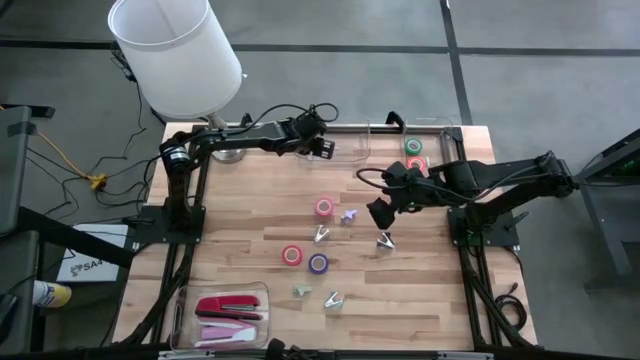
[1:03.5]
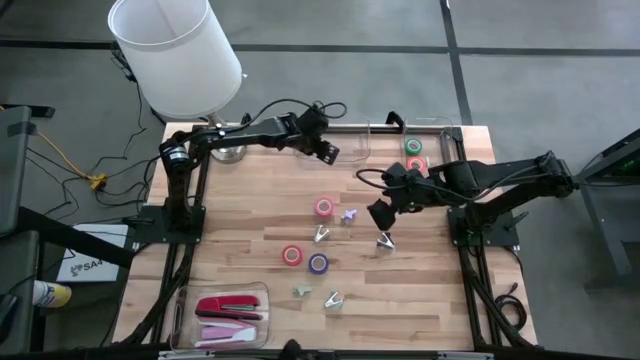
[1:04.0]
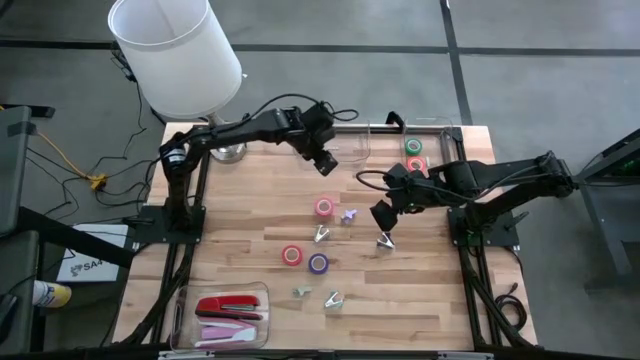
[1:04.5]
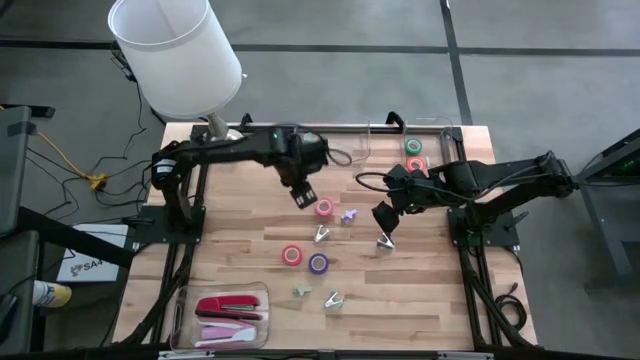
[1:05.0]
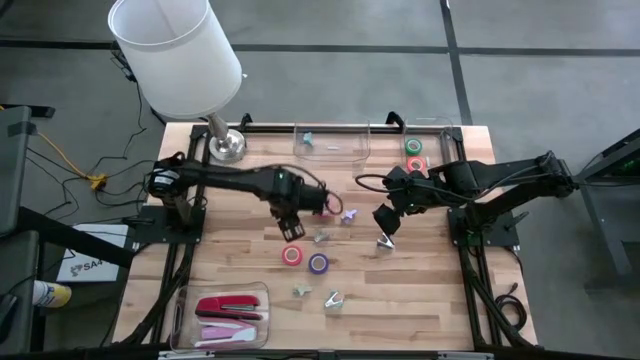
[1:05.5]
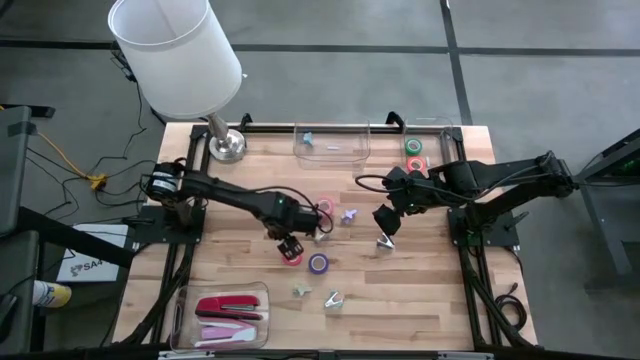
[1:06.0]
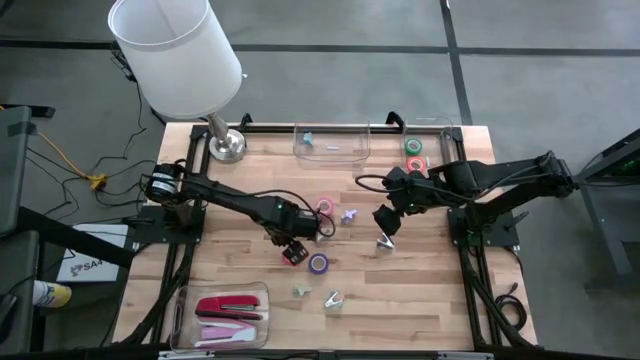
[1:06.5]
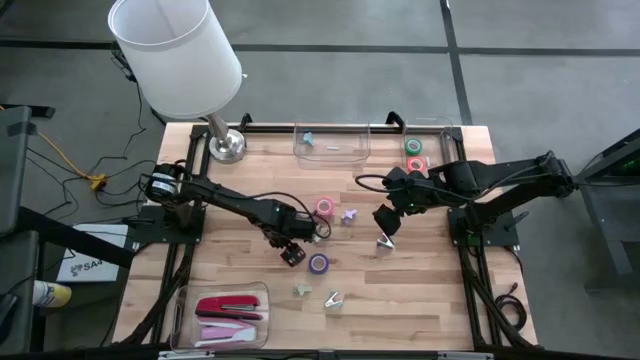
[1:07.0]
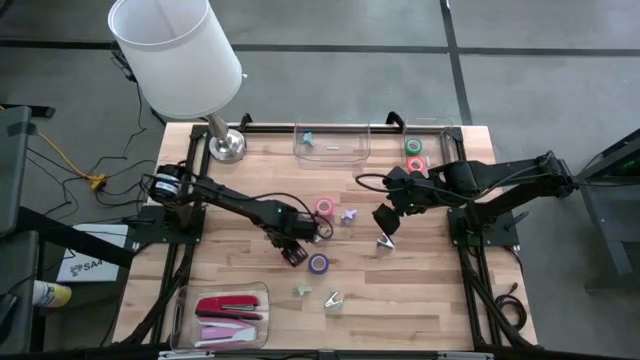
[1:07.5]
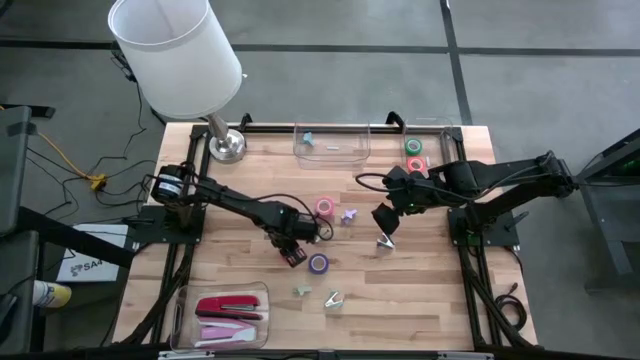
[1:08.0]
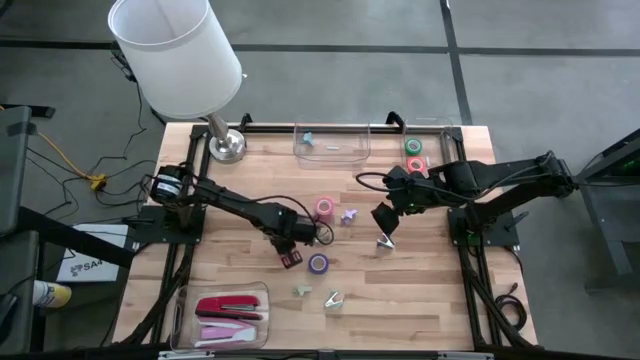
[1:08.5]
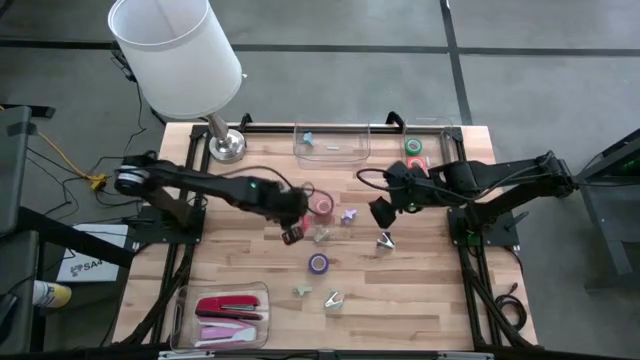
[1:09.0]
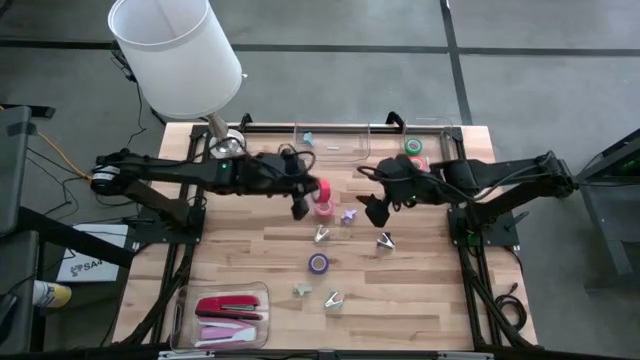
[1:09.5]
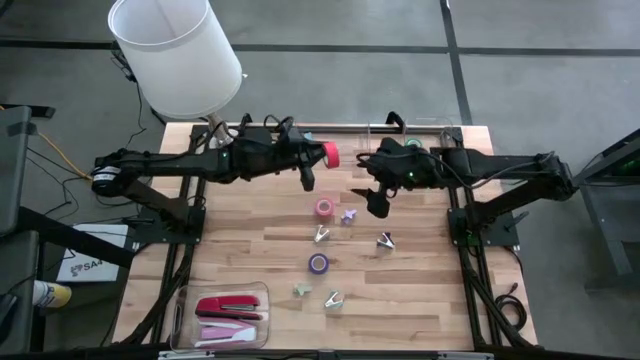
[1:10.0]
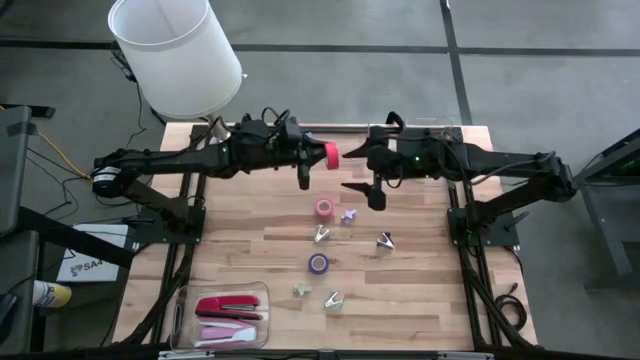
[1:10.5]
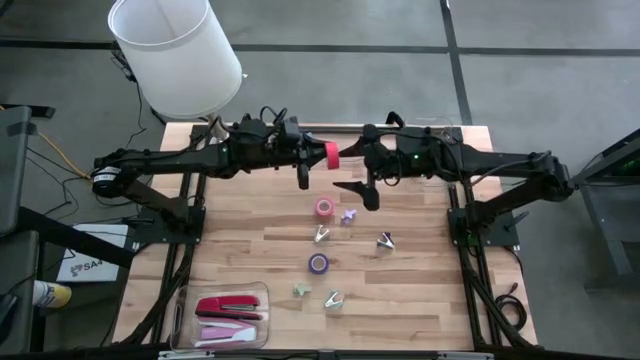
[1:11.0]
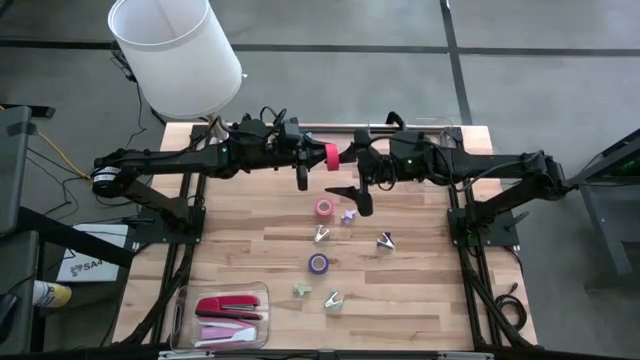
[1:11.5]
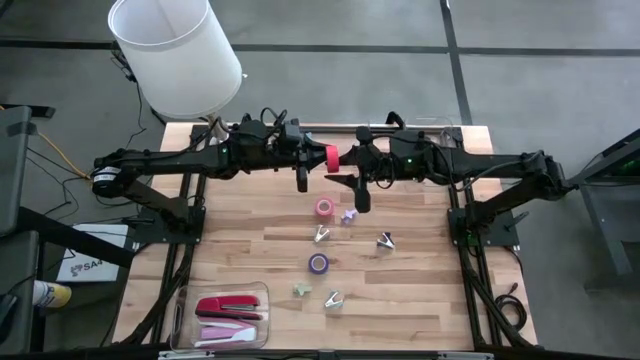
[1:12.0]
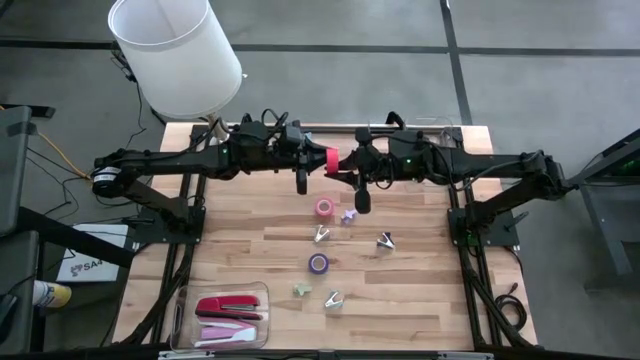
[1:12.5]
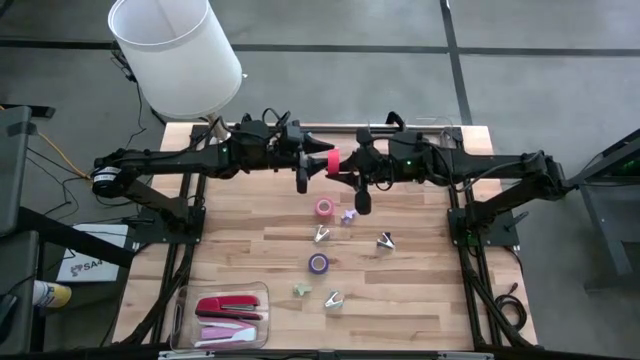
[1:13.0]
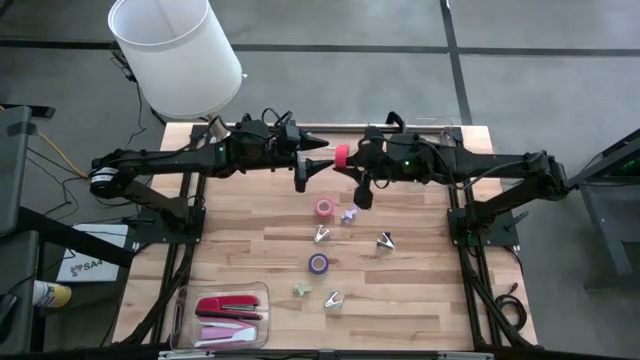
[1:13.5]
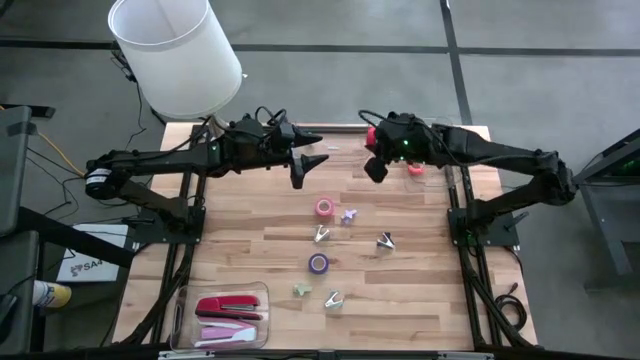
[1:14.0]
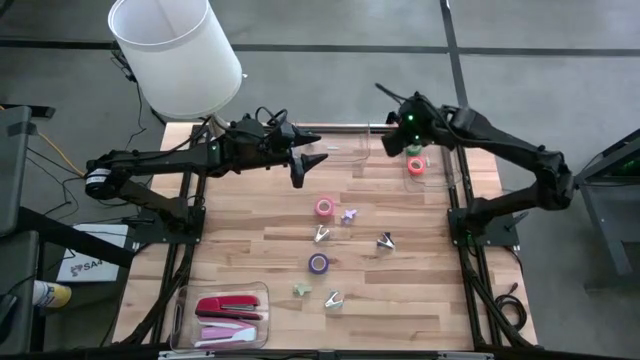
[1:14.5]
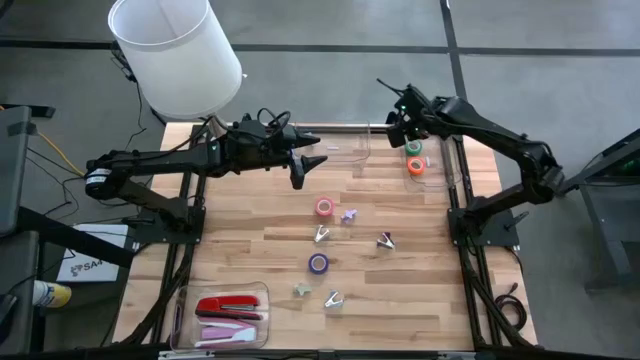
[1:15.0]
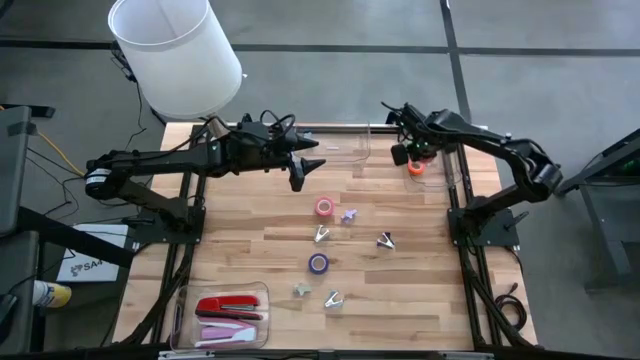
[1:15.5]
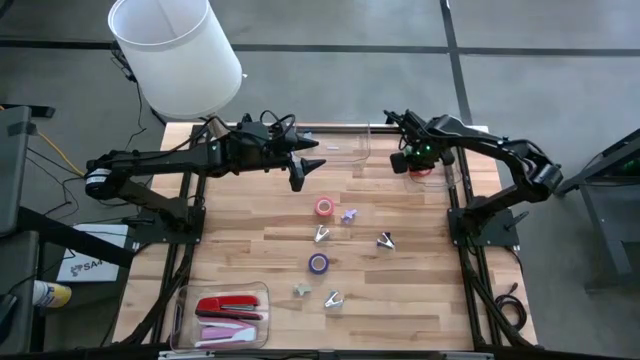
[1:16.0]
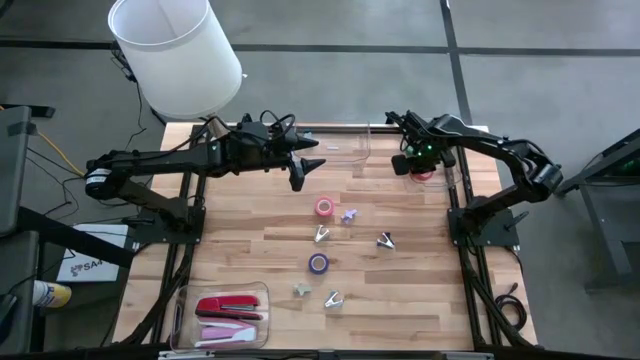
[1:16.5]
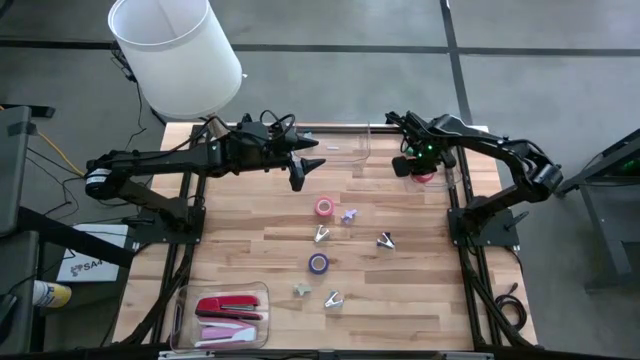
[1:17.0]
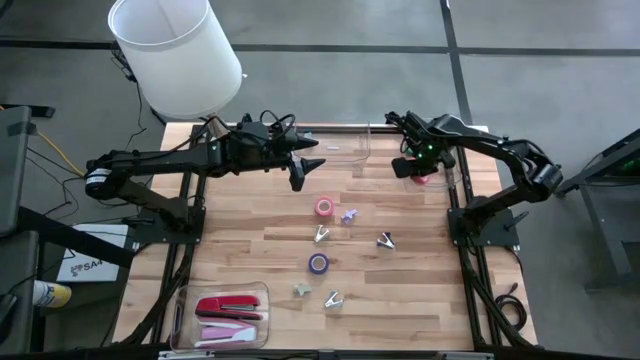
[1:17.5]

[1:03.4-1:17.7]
Task: Pick and place Stapler, Stapler remover, tape
Put the red tape into the top right transparent bin

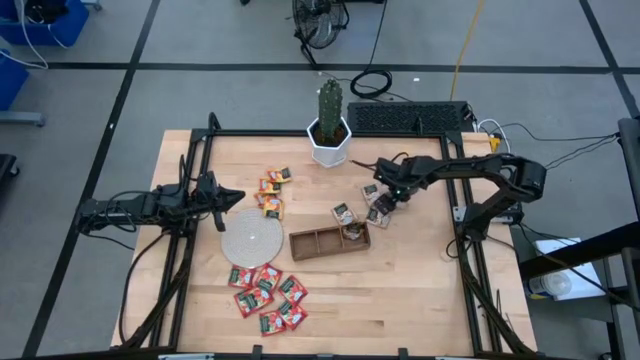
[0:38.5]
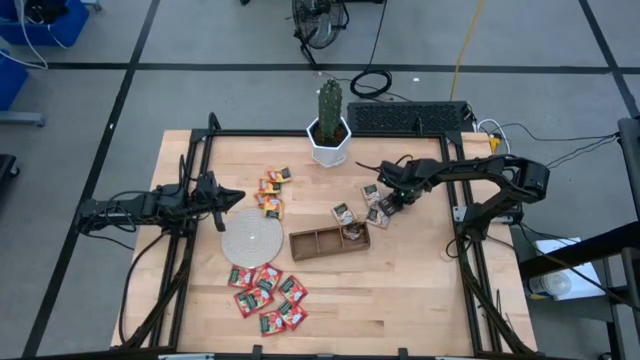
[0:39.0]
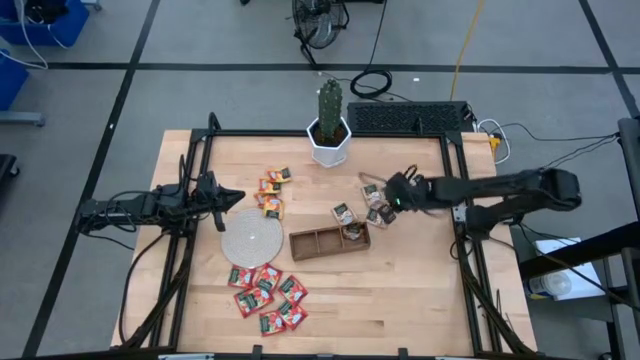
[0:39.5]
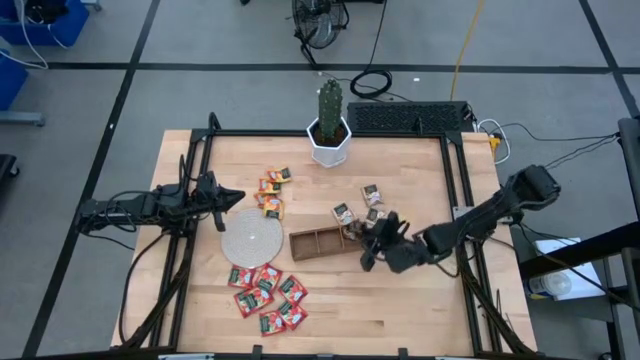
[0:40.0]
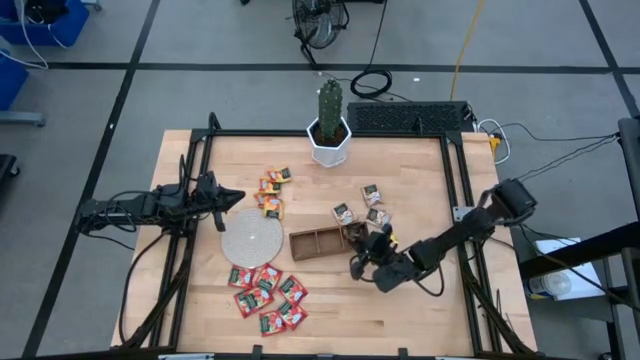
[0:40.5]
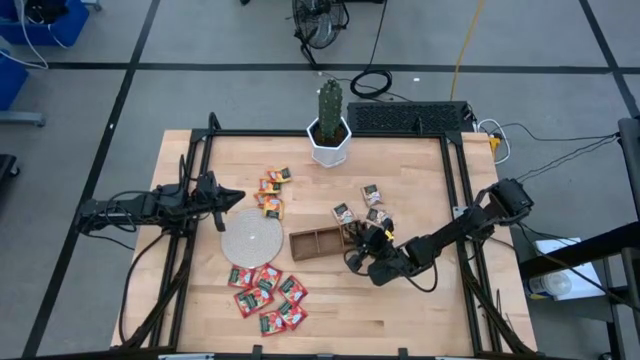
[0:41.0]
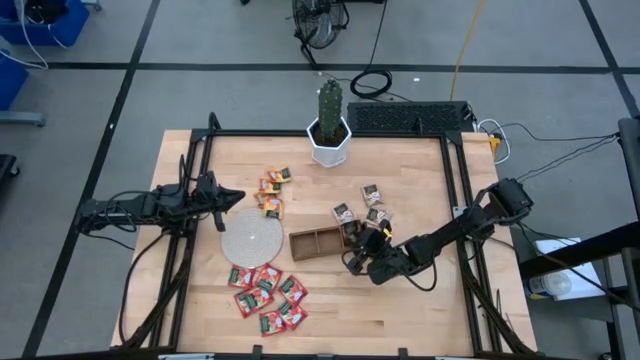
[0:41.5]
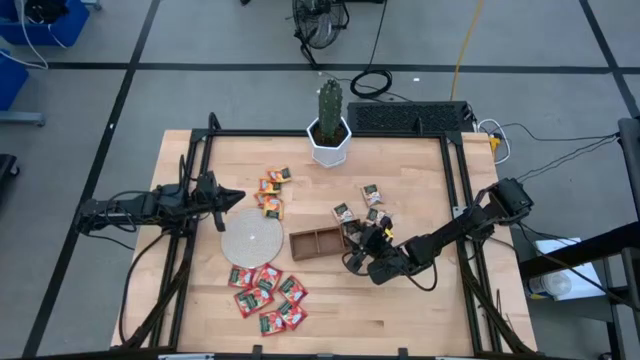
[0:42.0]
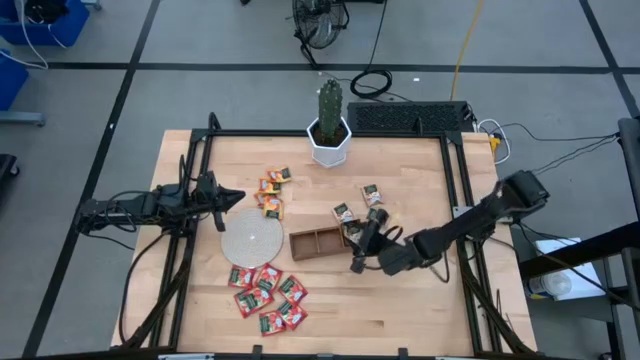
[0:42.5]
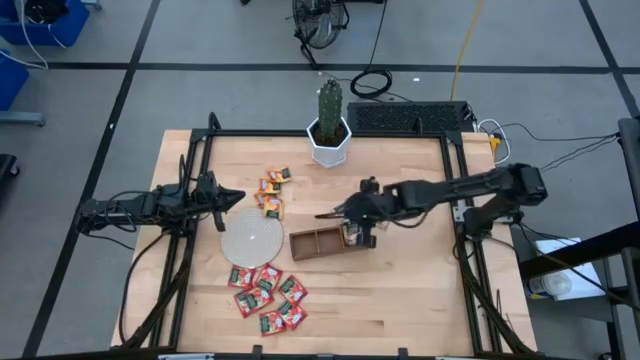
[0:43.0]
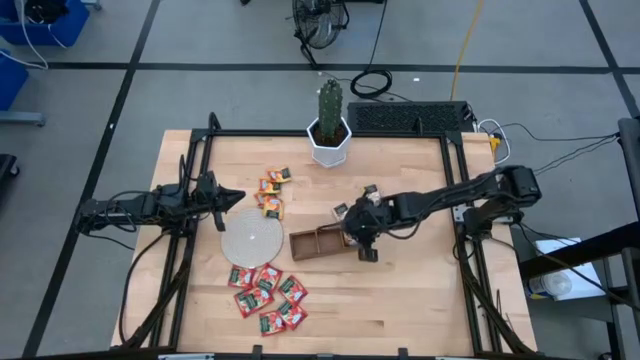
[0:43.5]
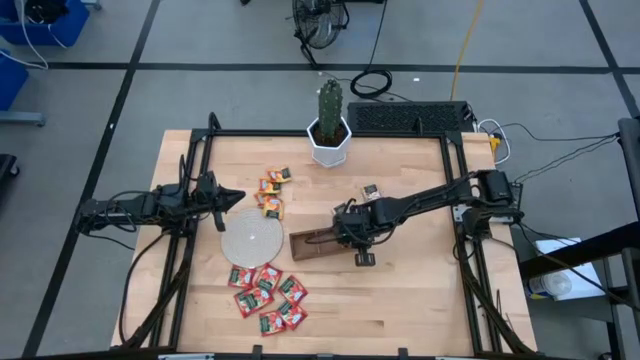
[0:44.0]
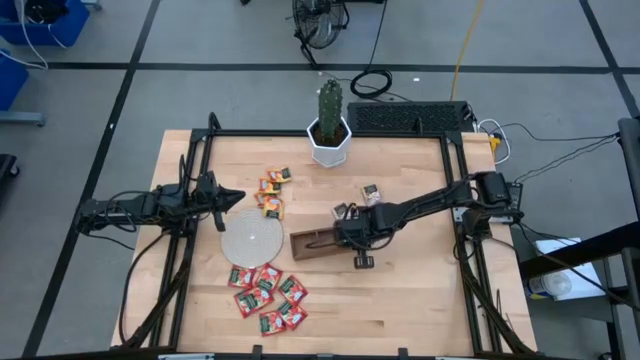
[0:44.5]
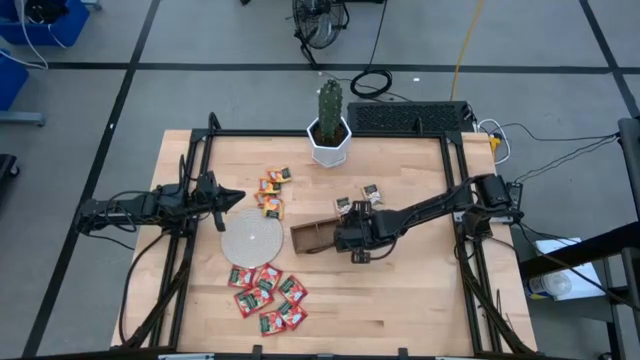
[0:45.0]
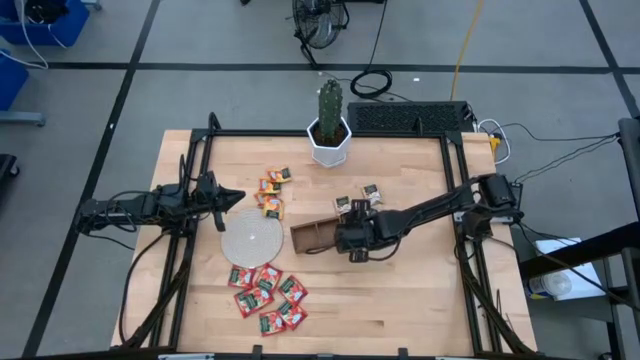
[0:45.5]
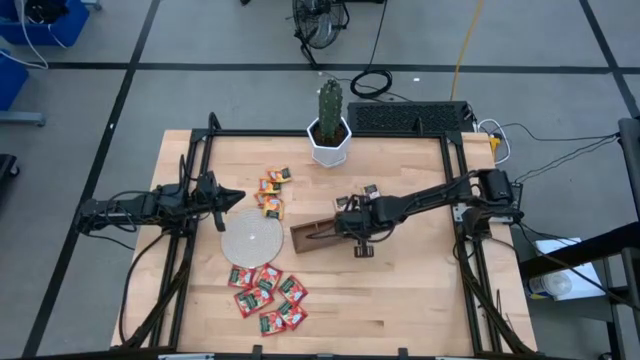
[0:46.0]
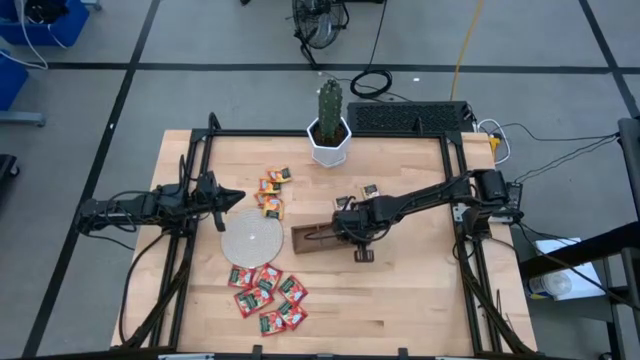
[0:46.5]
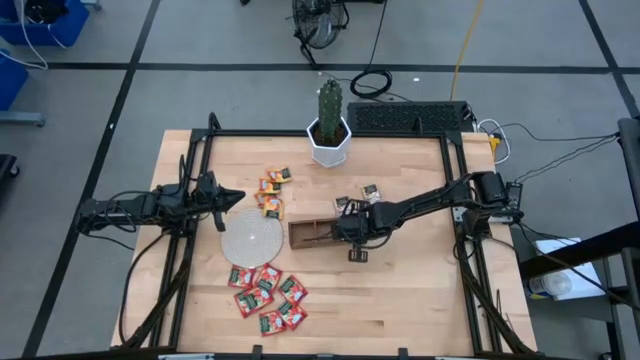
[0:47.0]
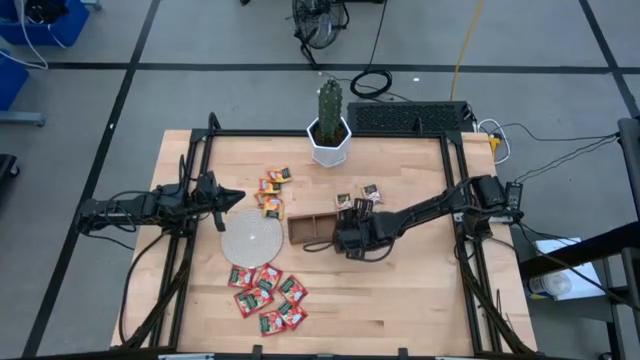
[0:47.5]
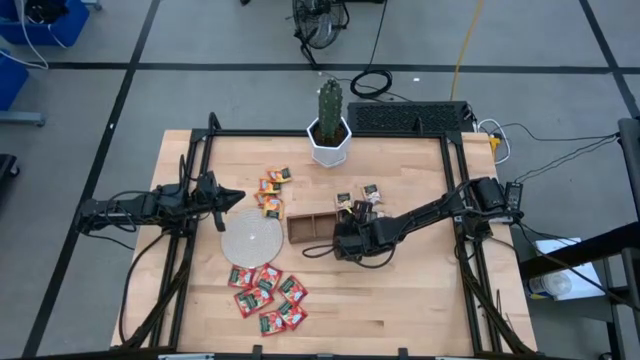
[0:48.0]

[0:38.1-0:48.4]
Task: Pick & Place Tea
Put the brown tea bag into the right section of the wooden organizer
